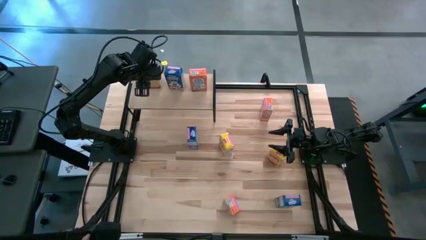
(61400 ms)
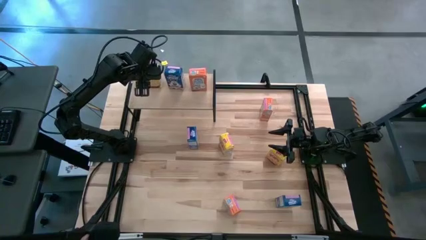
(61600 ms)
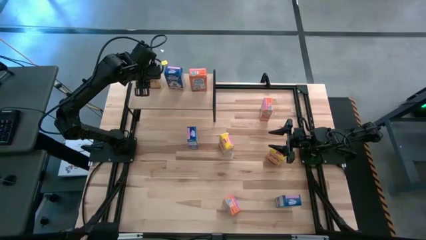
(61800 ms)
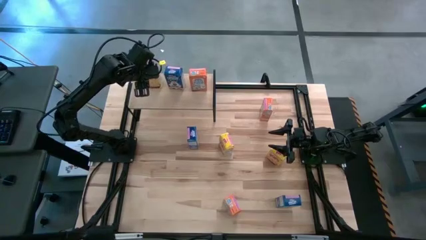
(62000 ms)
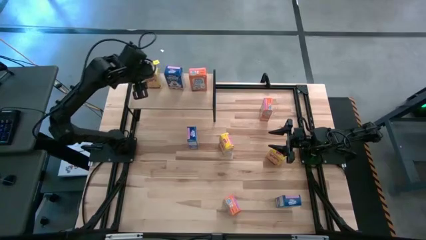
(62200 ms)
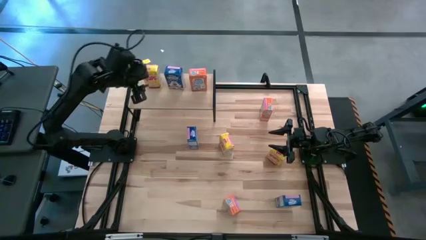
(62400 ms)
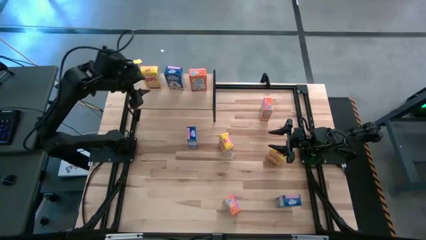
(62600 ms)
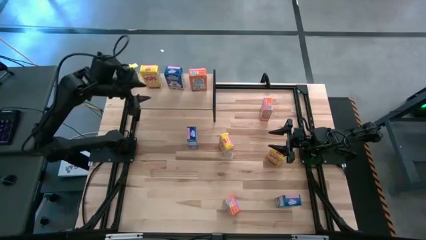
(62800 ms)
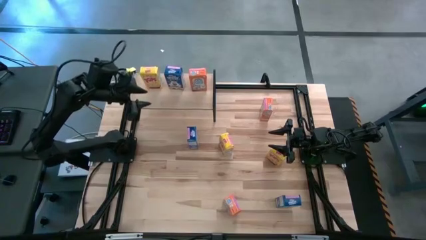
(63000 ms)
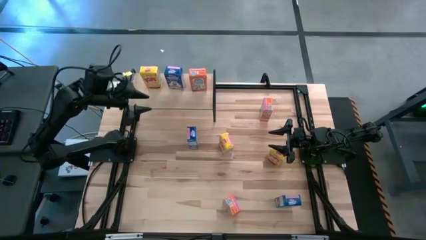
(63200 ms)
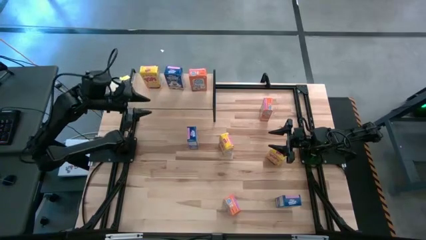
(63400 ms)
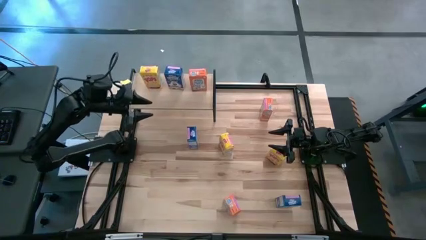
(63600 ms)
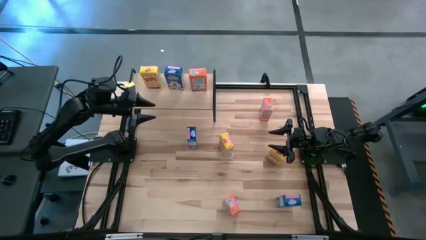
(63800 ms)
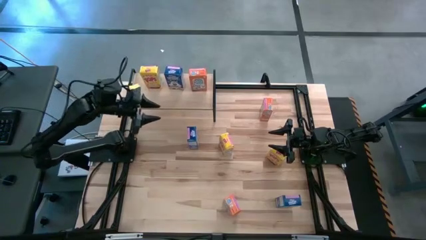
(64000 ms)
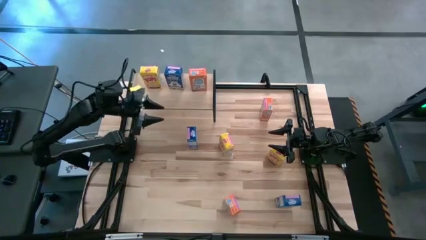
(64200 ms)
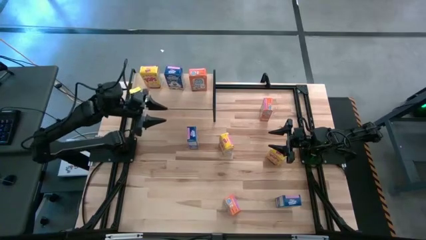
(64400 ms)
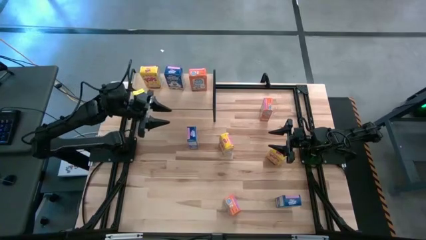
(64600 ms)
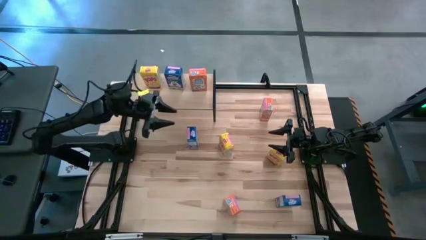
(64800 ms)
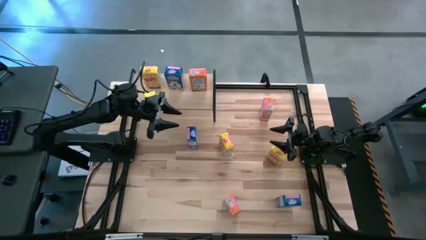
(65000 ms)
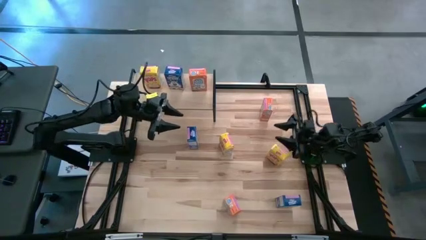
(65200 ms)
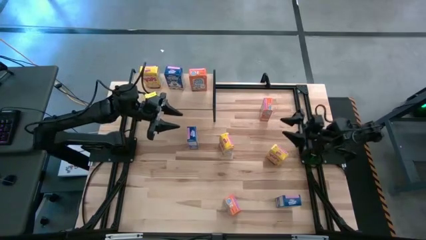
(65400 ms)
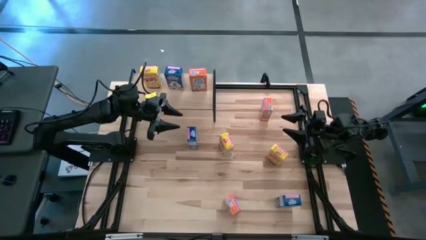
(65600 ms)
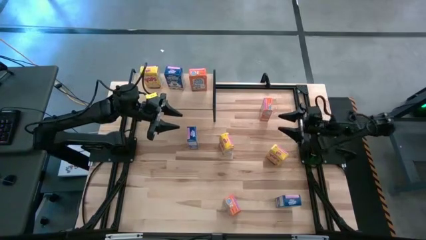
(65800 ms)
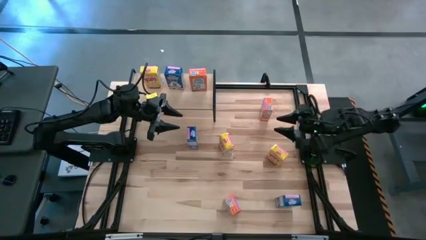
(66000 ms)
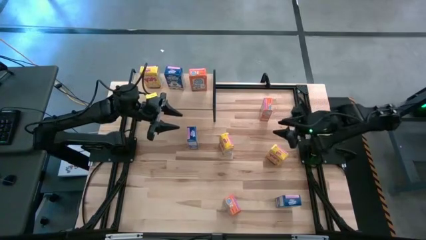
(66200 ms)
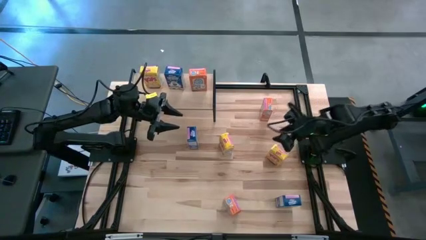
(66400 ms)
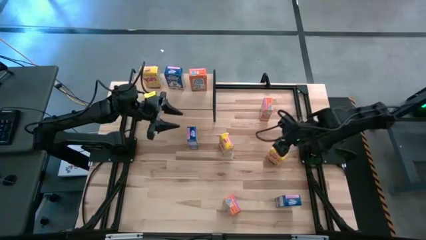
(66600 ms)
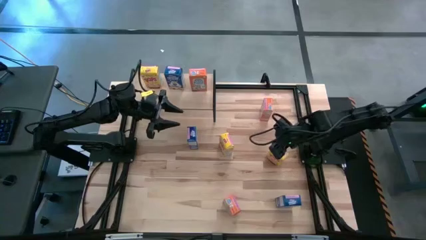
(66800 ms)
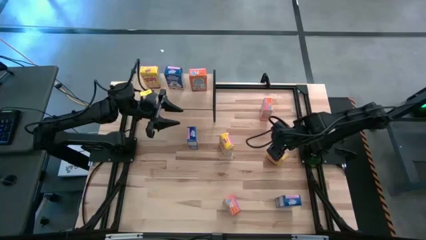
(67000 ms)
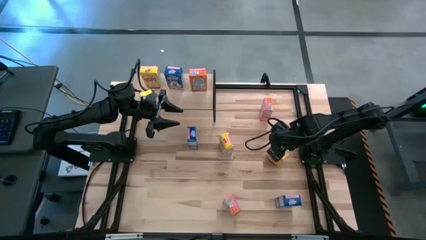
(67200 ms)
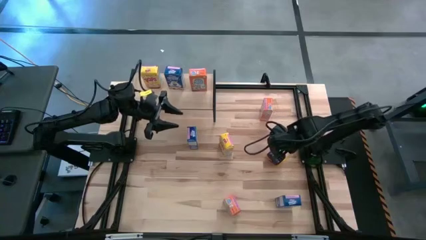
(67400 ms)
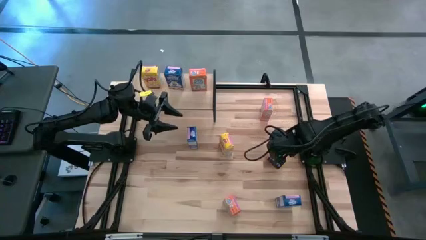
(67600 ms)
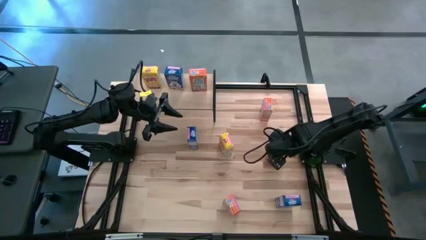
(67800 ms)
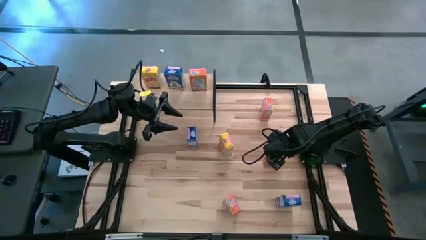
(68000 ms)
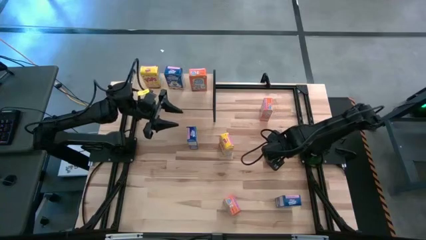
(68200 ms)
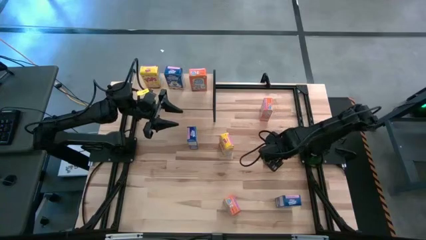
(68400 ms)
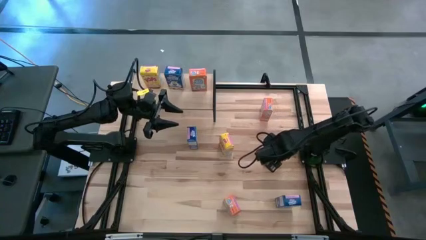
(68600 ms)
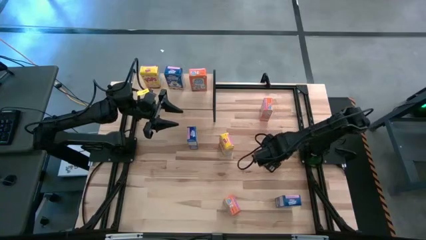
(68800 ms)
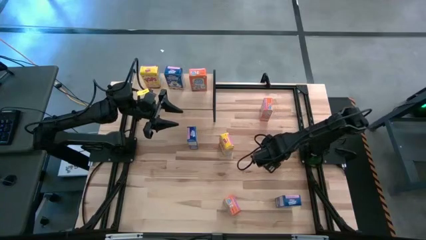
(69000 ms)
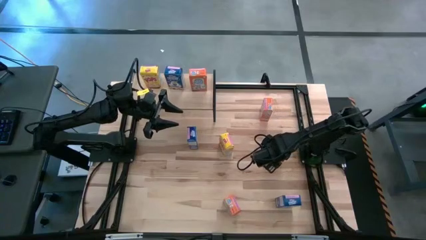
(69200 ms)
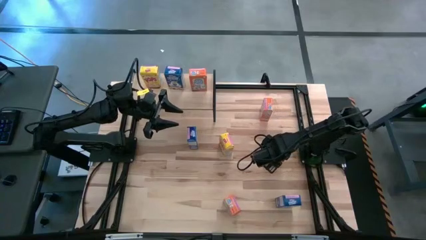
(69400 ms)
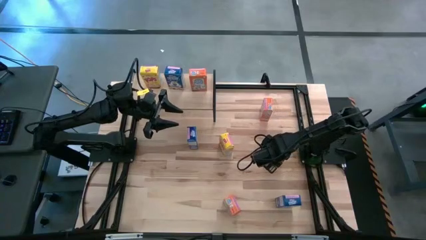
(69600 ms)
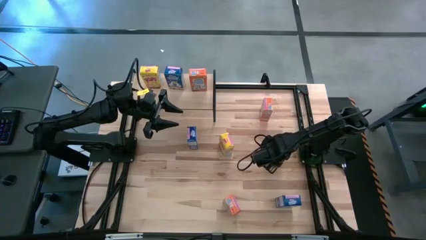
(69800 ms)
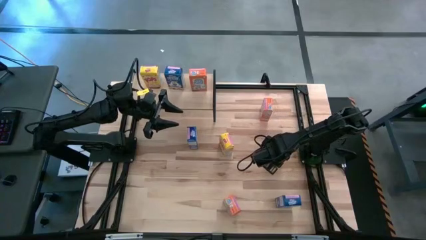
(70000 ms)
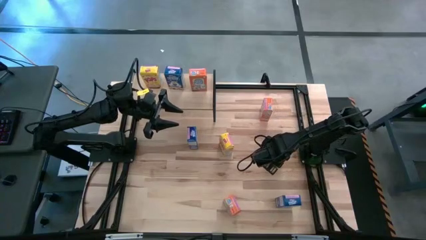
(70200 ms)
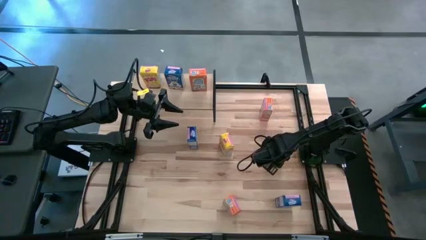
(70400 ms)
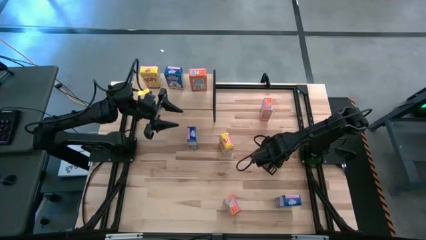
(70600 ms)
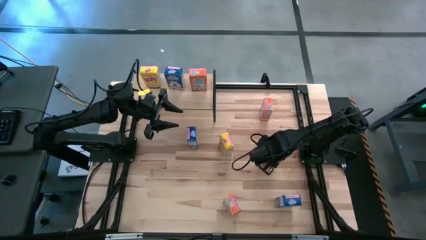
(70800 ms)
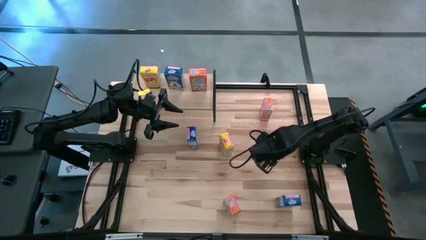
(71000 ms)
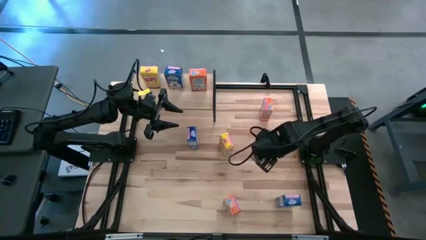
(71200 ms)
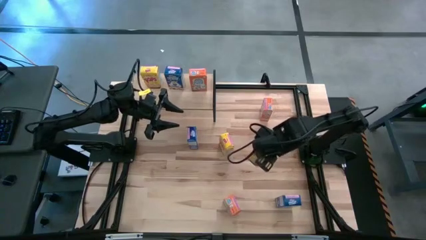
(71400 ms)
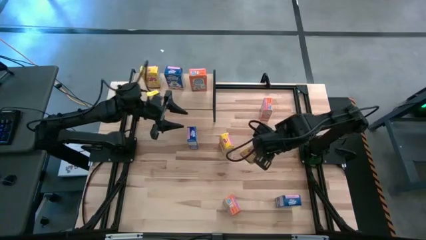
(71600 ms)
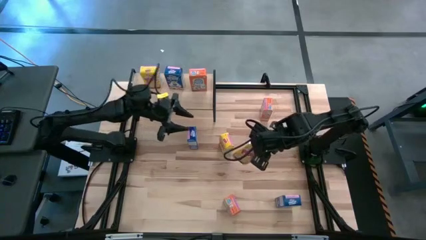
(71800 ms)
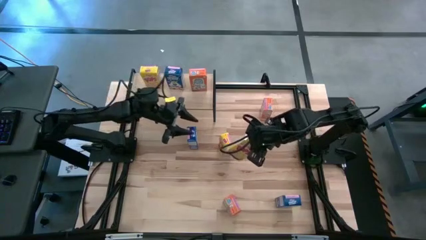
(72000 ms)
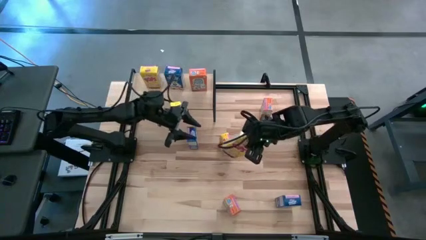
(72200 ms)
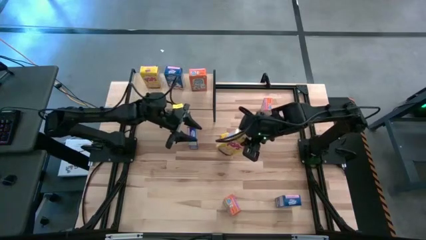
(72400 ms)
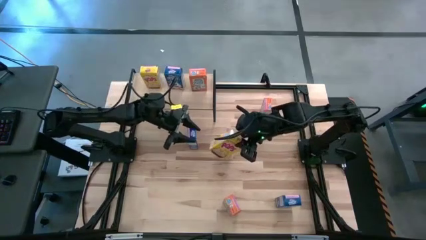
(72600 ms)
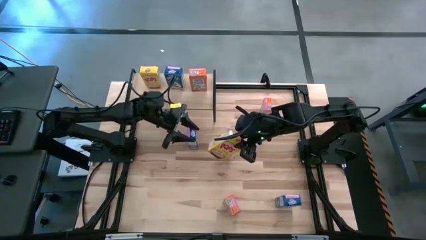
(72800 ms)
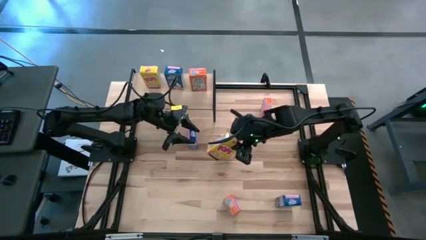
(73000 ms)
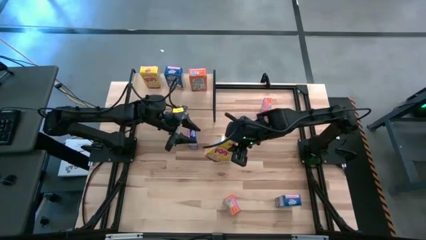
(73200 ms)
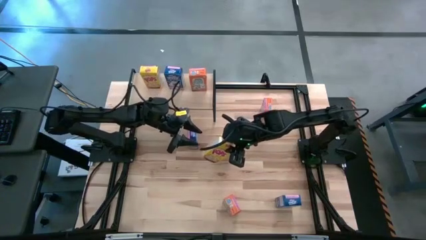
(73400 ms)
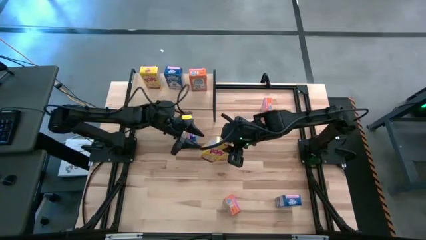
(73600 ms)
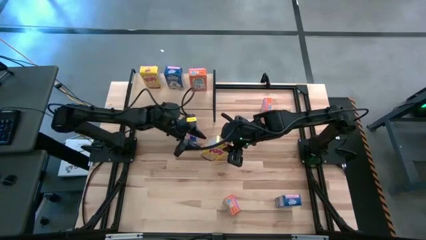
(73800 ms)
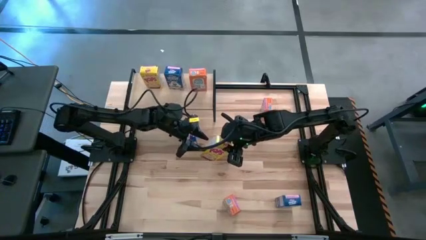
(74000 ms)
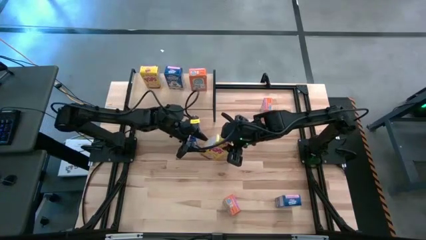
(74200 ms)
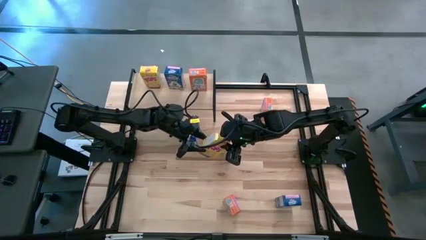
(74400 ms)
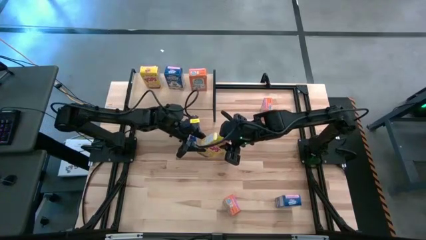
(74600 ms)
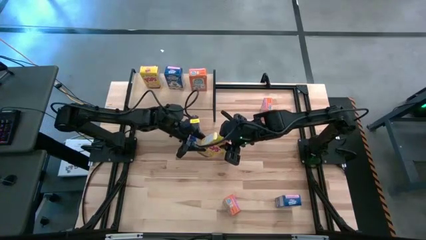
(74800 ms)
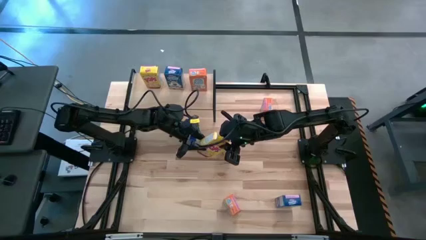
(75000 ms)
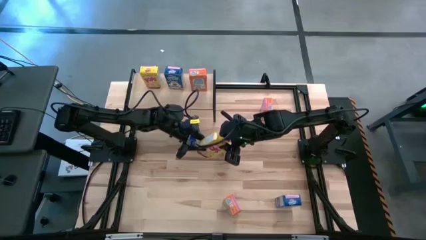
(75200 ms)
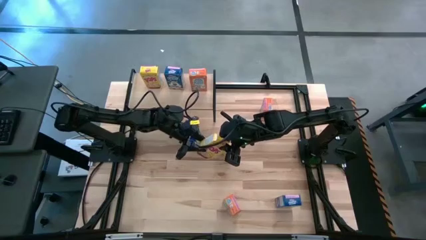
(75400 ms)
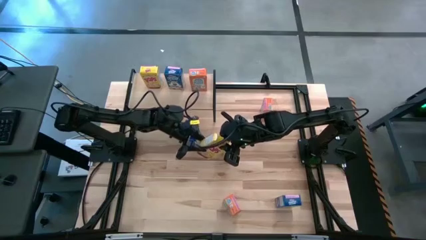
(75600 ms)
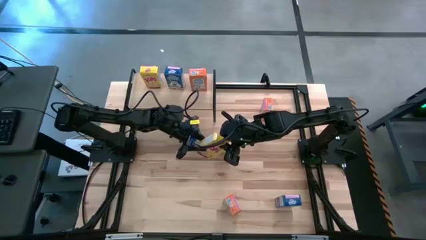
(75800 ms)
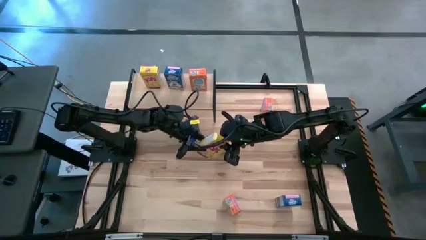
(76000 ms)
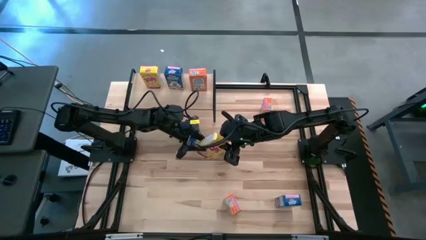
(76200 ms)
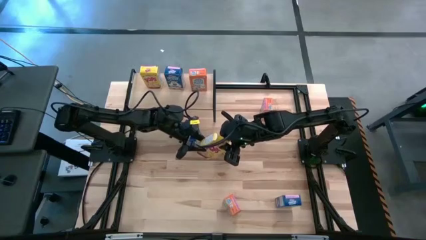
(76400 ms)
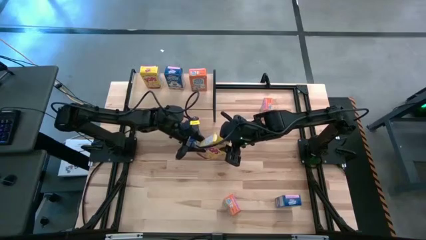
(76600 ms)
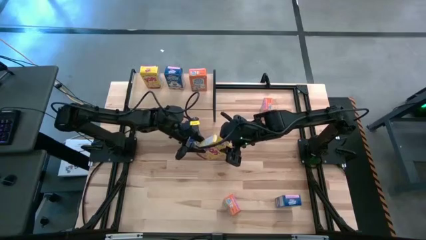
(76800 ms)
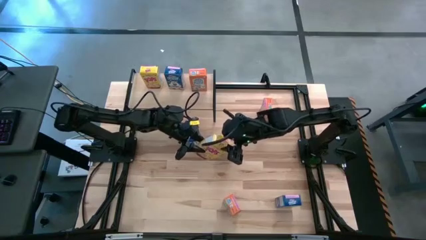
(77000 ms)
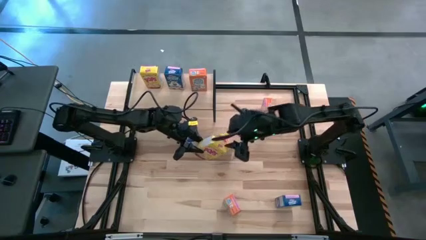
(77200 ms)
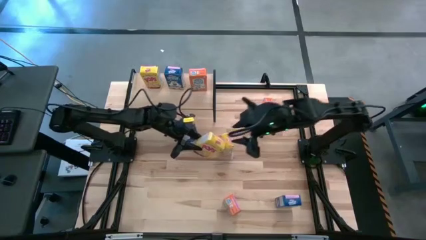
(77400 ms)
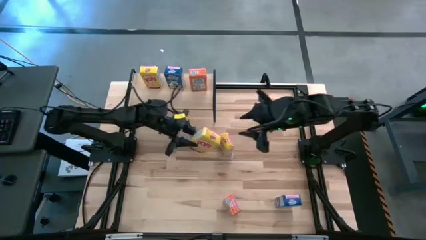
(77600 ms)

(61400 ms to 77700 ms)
Task: Stack cereal on shelf
Put the right yellow cereal box on the shelf aligned with the other yellow cereal box

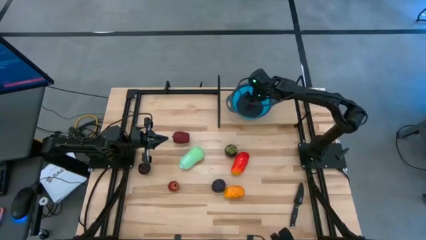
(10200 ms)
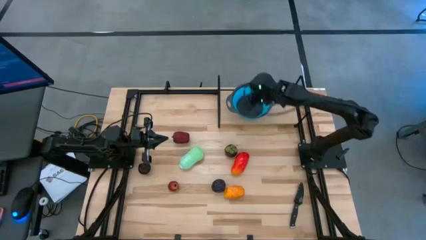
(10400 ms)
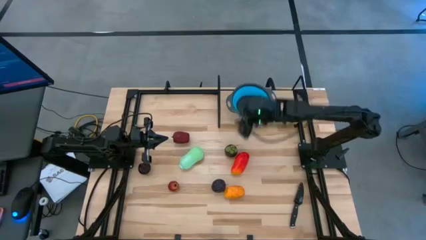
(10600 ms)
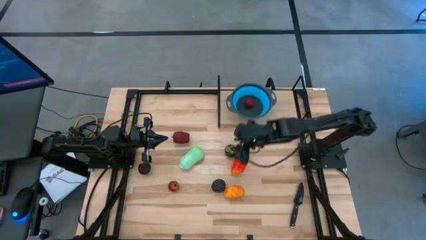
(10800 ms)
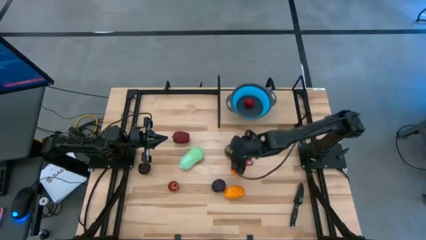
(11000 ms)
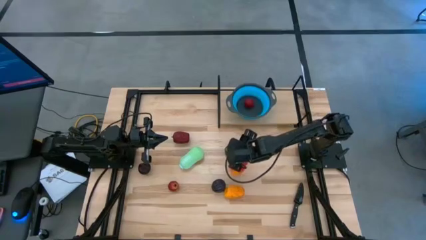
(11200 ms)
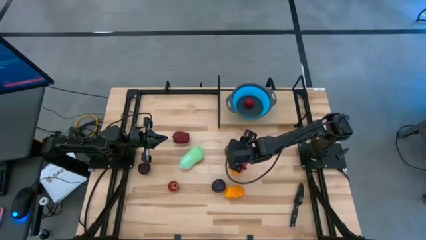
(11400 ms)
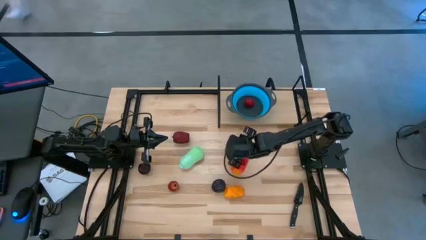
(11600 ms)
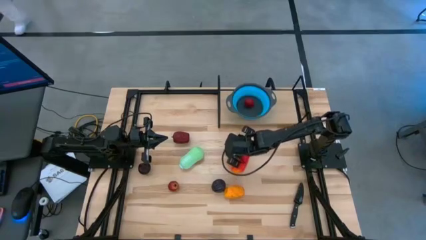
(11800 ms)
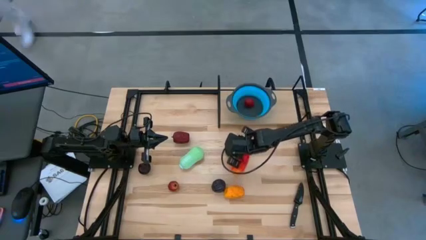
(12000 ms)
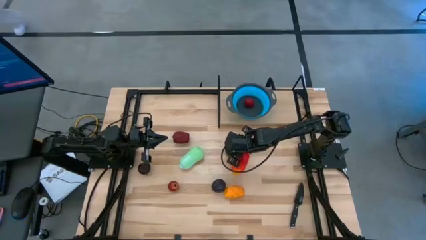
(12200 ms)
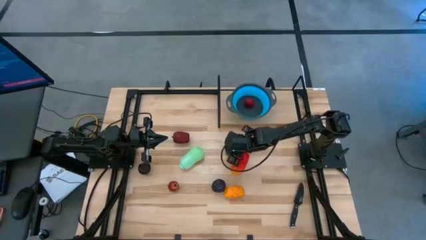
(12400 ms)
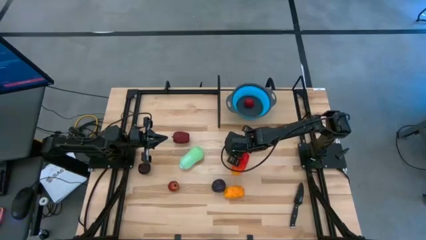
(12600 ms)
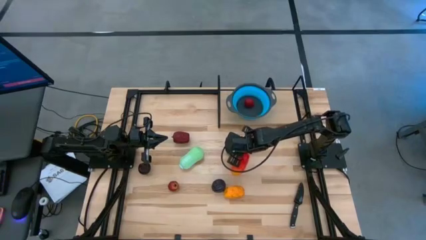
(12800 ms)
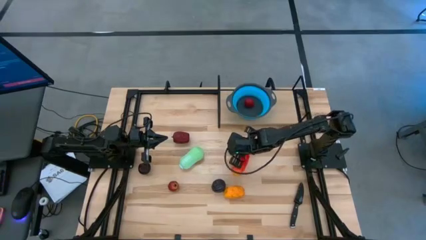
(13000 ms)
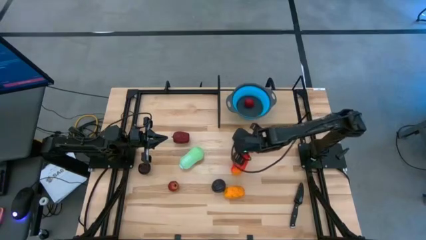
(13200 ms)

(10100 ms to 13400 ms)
Task: Pick & Place Fruit
Put the black mangosteen into the blue strainer bowl on the shelf
